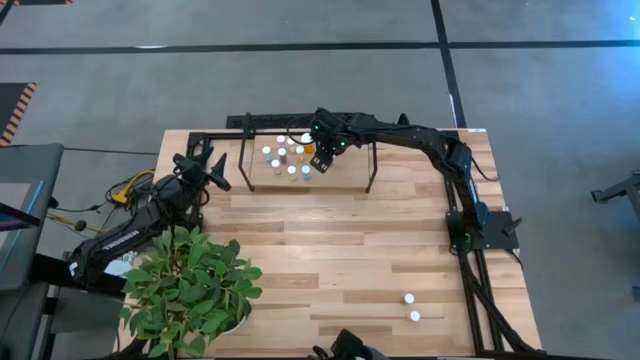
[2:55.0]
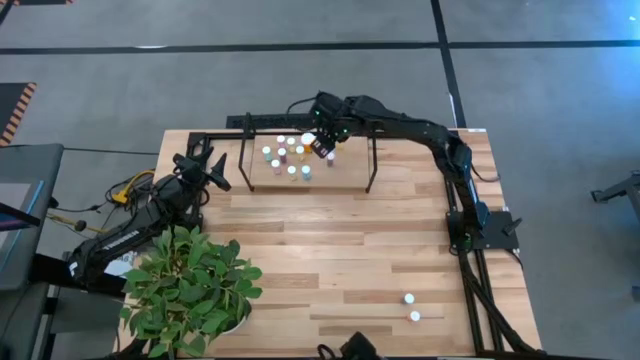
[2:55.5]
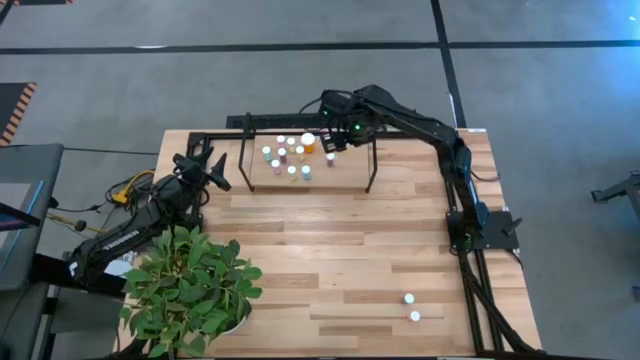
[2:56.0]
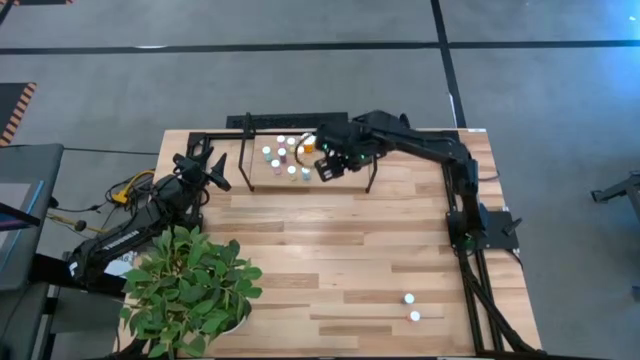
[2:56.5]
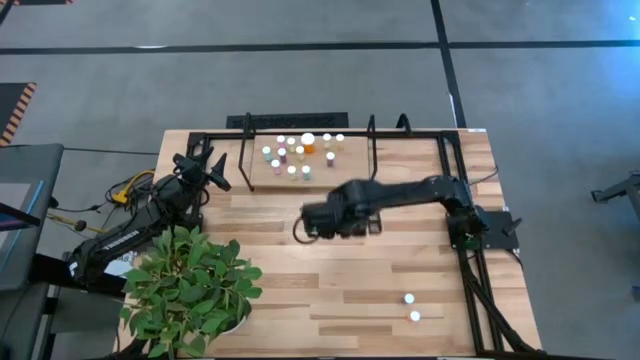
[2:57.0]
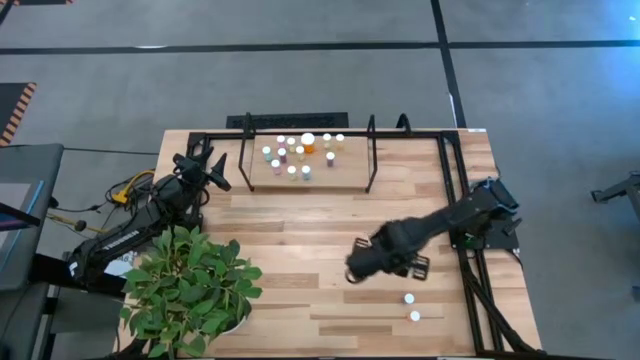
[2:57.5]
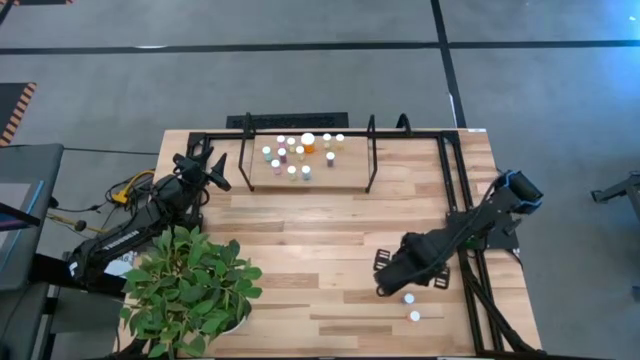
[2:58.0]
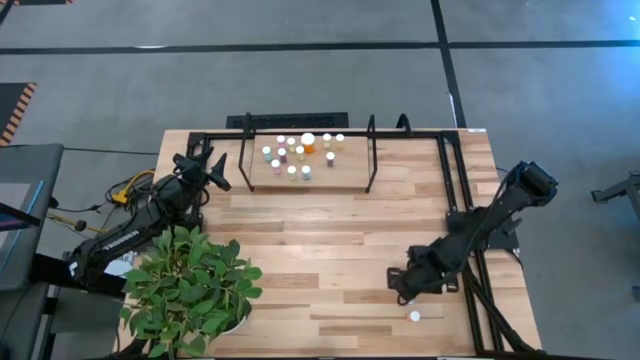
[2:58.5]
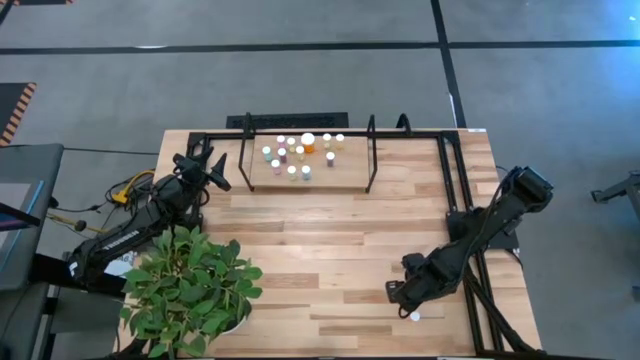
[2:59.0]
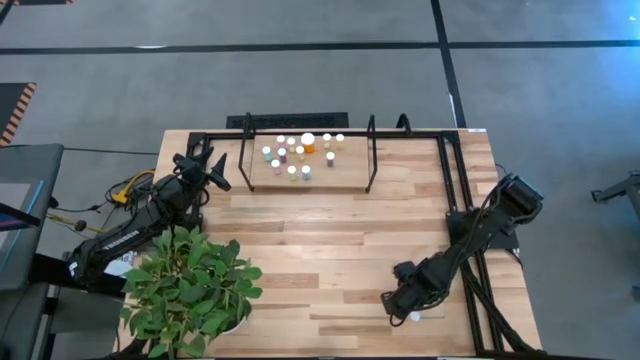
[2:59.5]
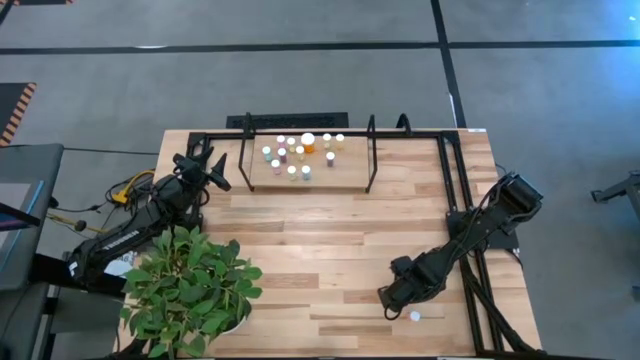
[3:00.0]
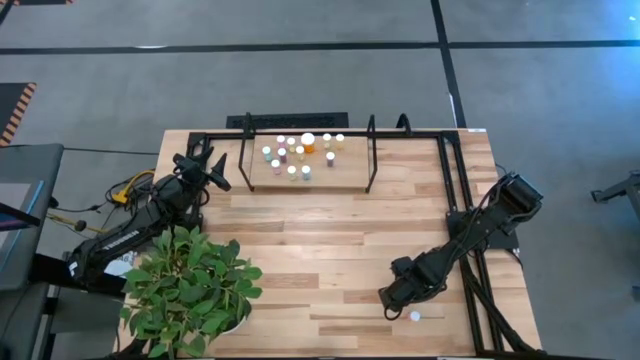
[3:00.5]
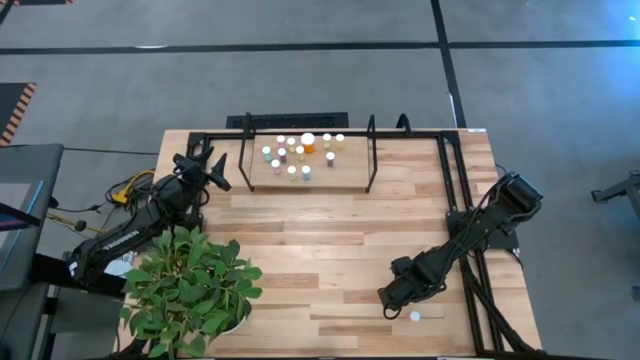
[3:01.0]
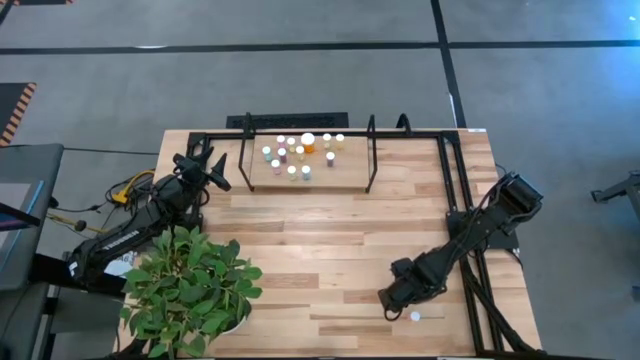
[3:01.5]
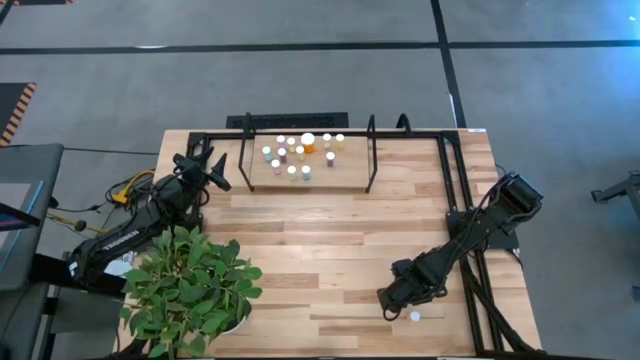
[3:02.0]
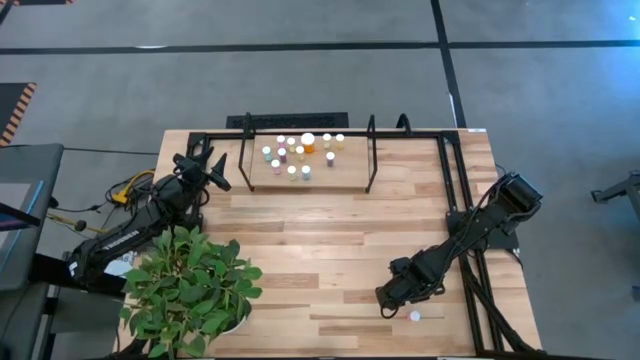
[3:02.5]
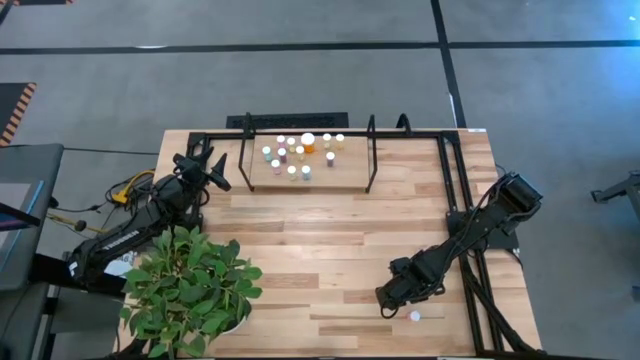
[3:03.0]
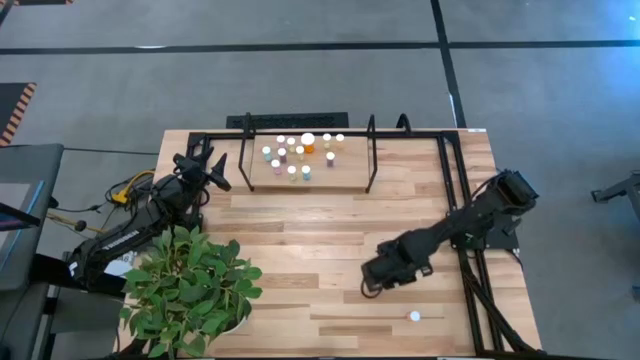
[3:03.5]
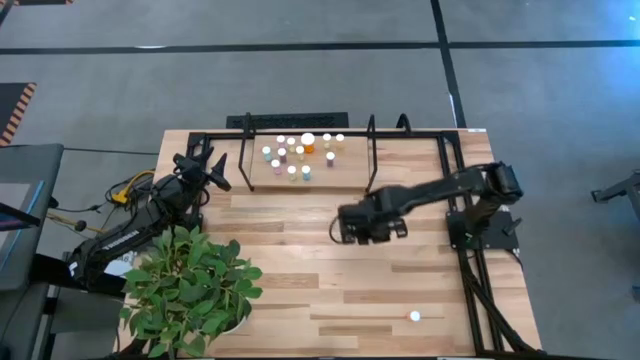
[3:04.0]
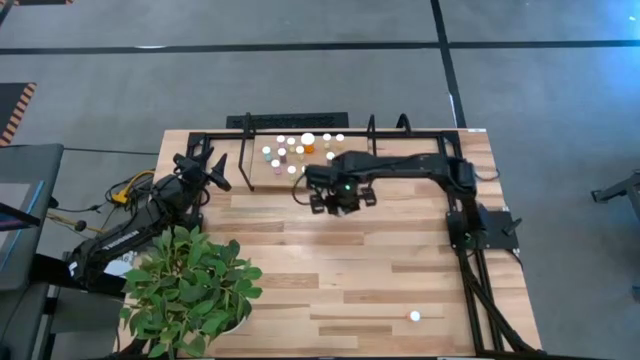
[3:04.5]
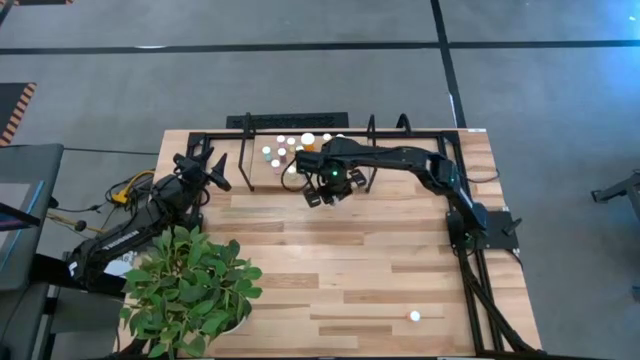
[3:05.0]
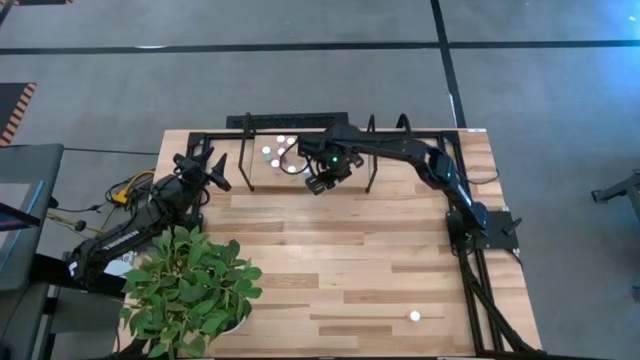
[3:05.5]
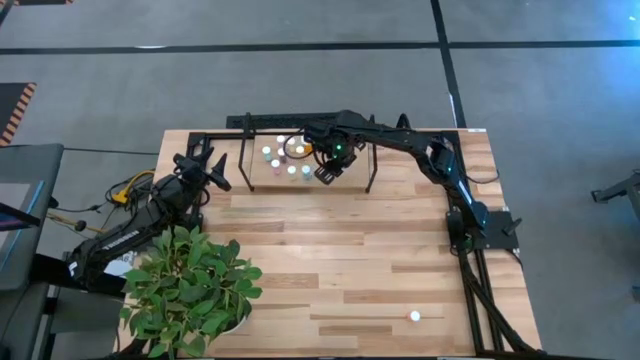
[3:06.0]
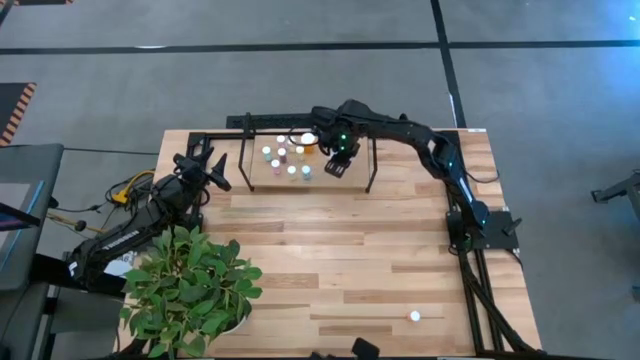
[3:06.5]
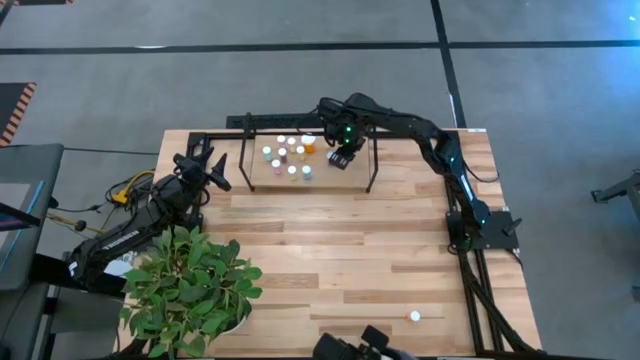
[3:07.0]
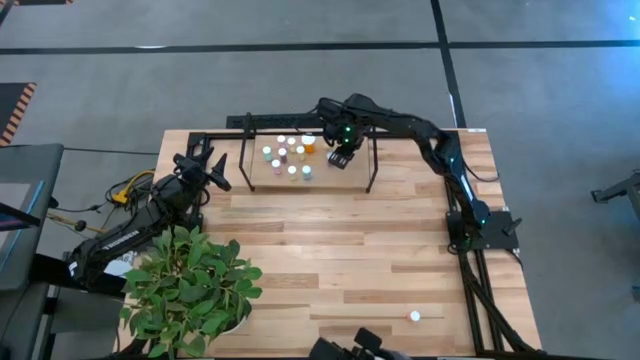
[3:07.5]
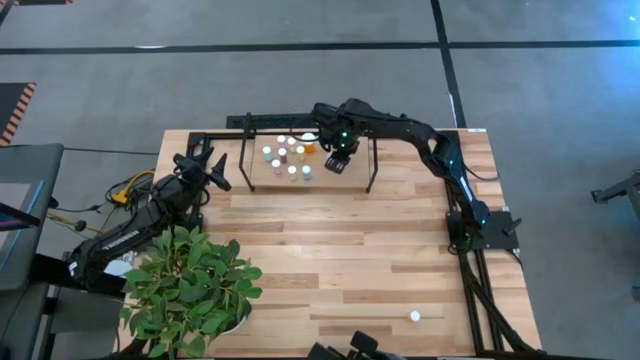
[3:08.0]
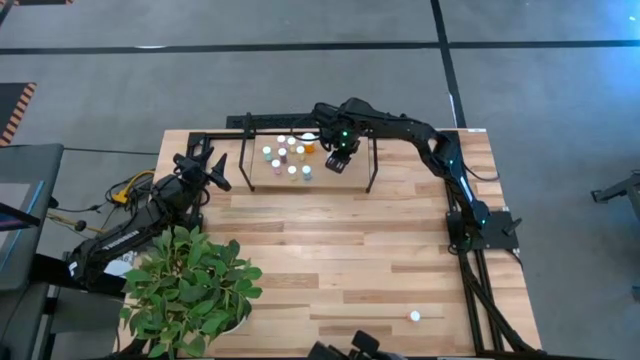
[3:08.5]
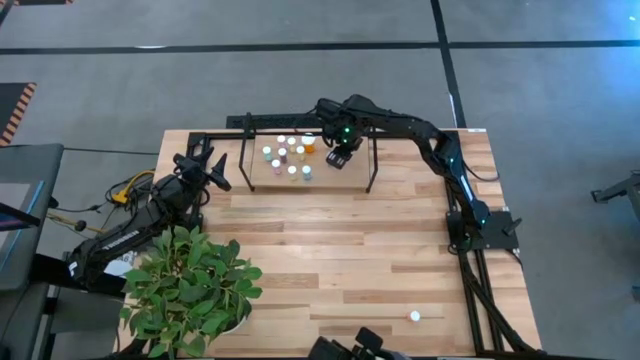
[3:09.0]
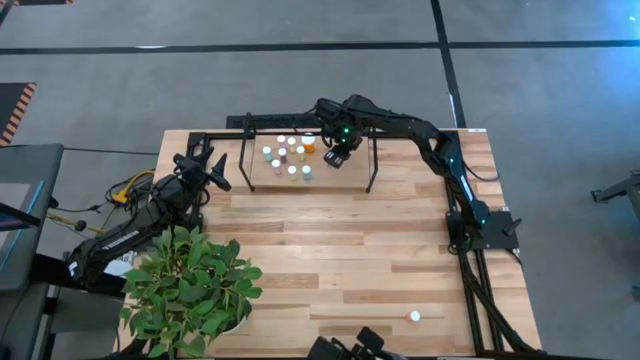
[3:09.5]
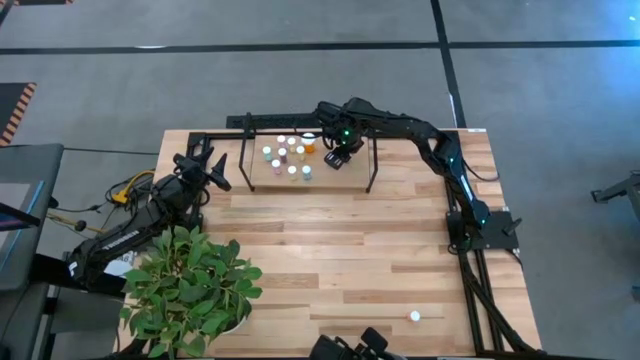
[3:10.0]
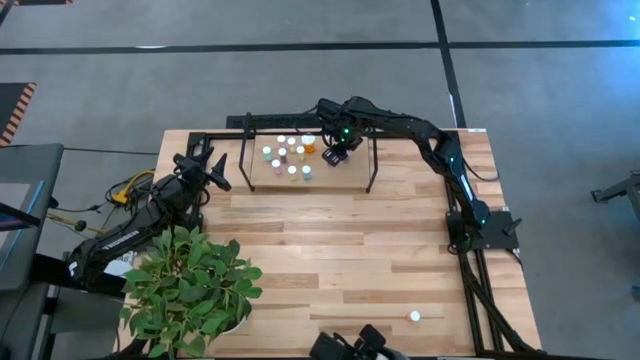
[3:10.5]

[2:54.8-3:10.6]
Task: Pick and place medicine bottles onto shelf by color
Put the blue pill bottle on the shelf

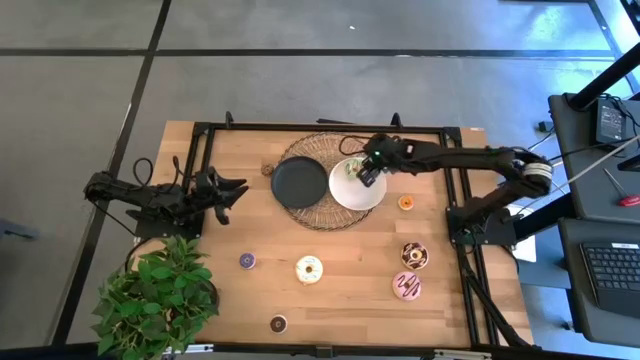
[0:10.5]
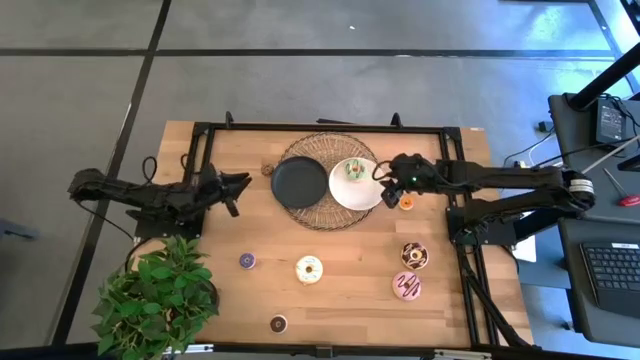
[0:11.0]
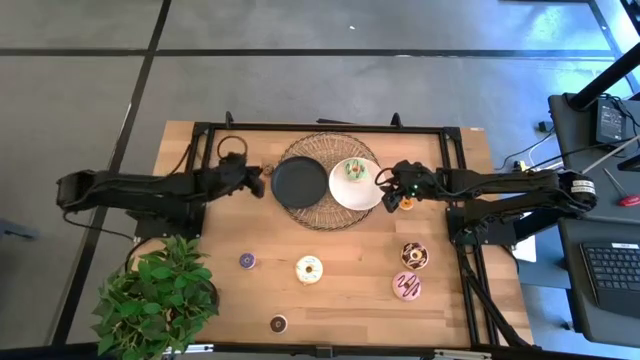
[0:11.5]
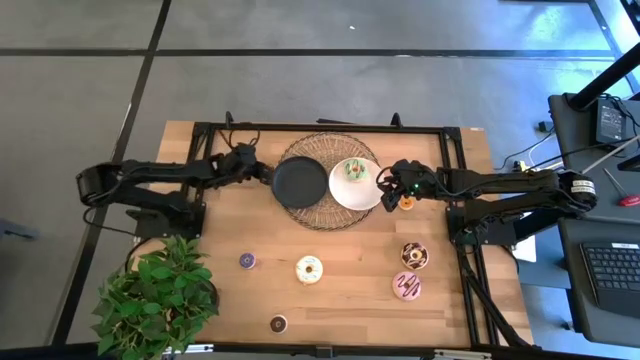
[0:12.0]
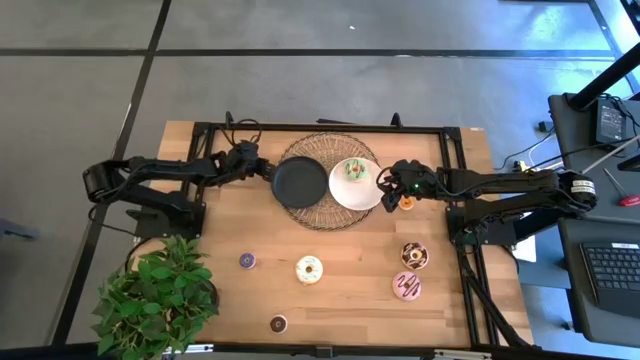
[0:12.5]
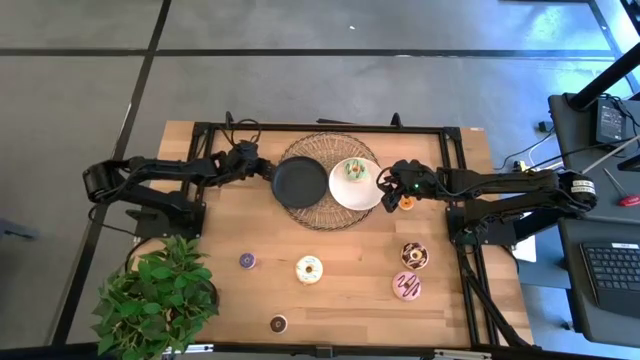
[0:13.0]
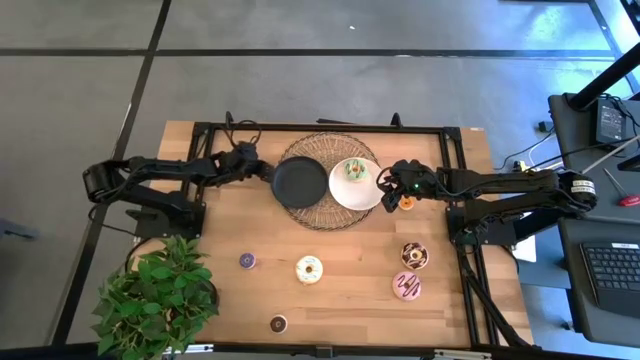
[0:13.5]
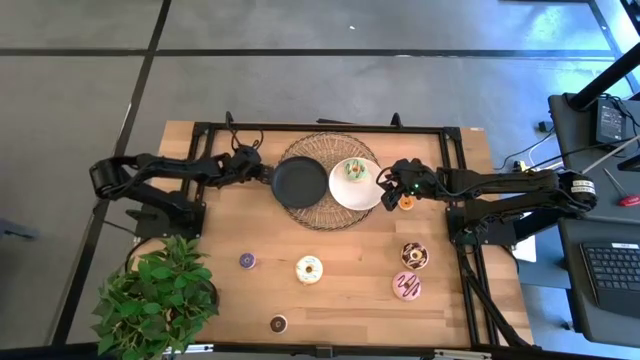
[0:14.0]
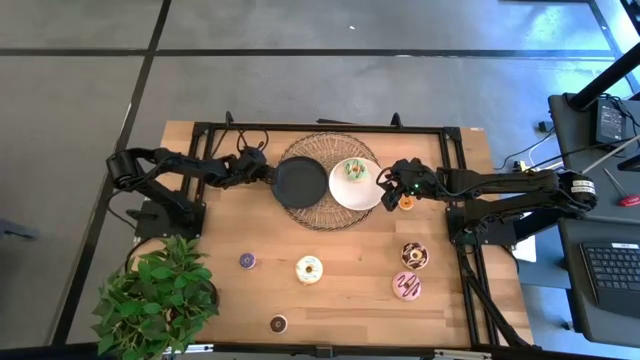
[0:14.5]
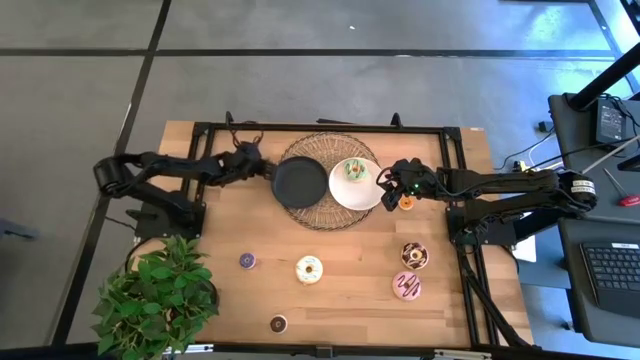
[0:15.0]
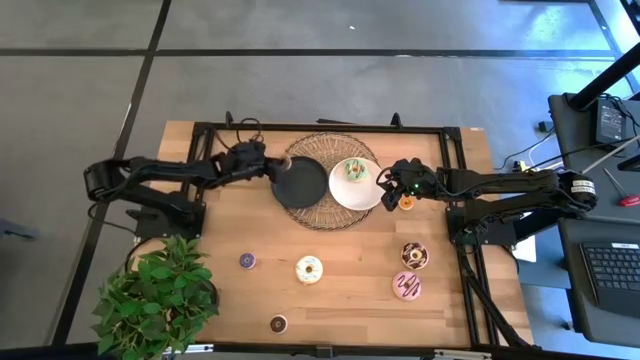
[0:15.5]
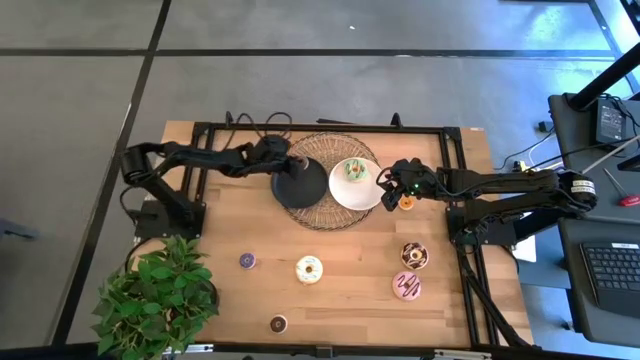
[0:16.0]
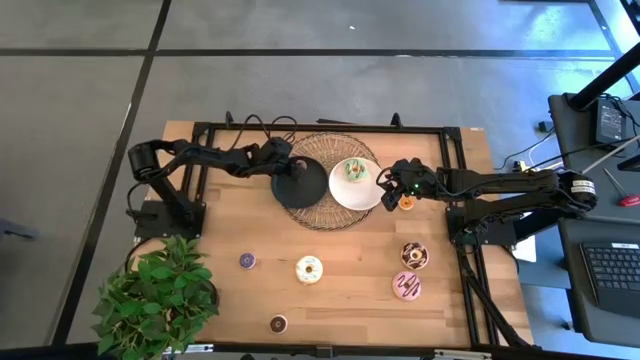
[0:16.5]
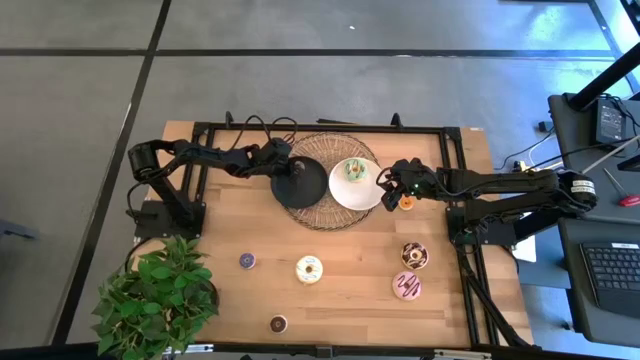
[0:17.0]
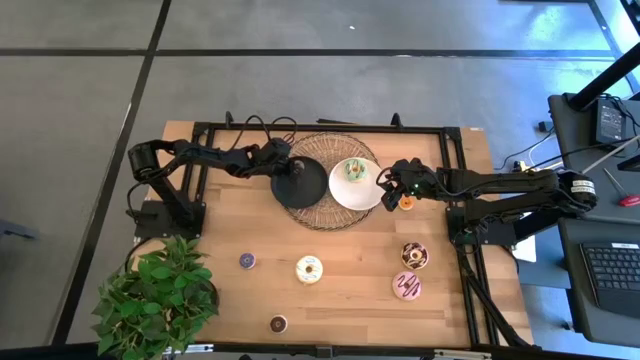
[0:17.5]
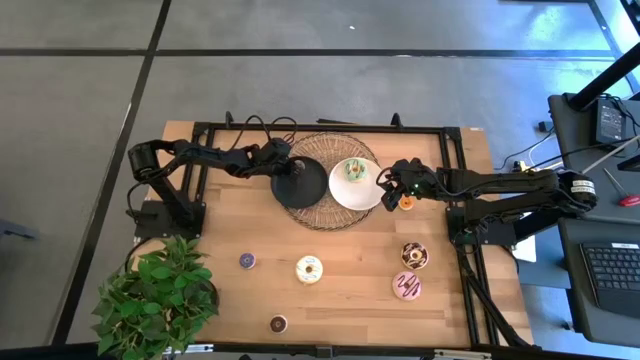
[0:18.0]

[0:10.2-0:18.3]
Task: Pick & Place donuts
Put the small brown donut on the black plate
